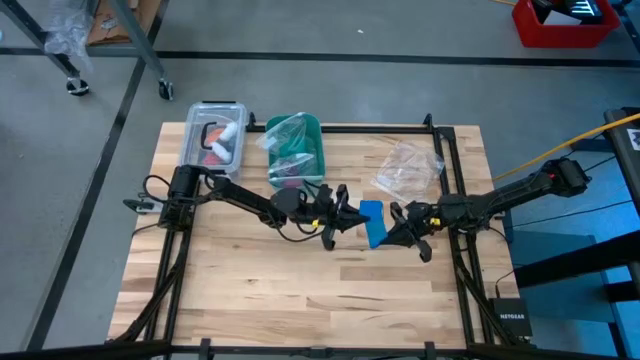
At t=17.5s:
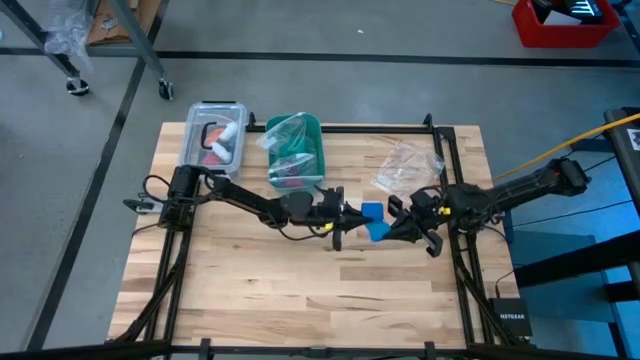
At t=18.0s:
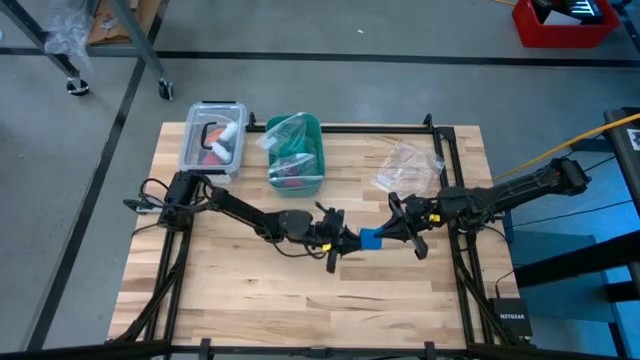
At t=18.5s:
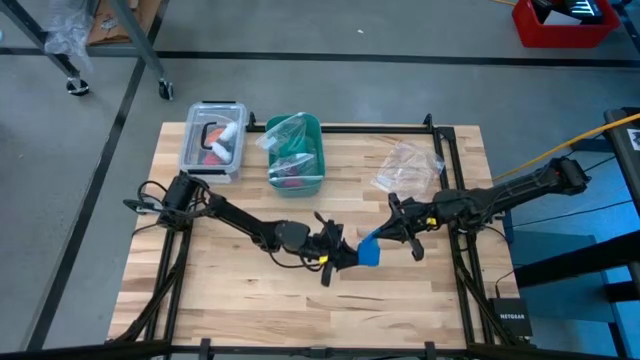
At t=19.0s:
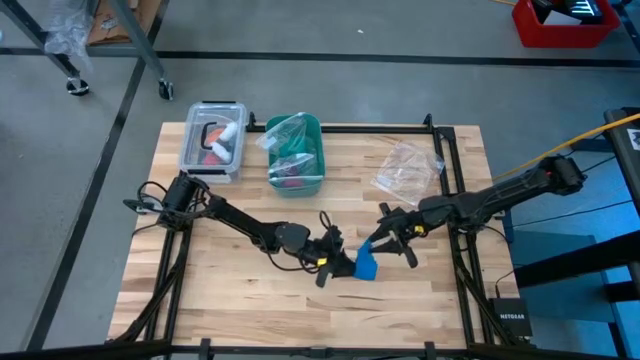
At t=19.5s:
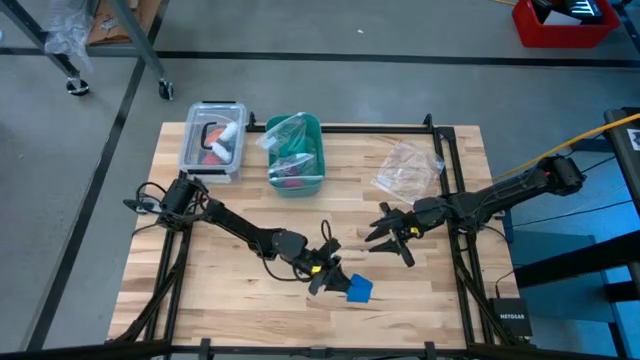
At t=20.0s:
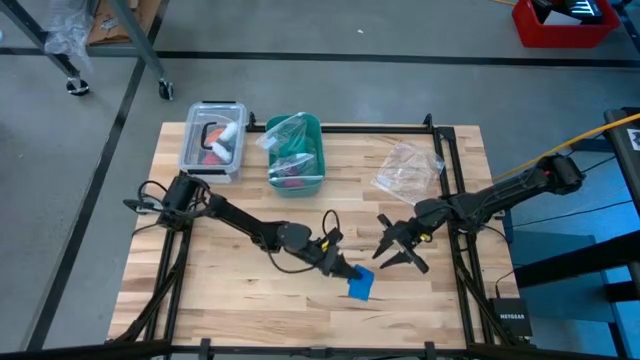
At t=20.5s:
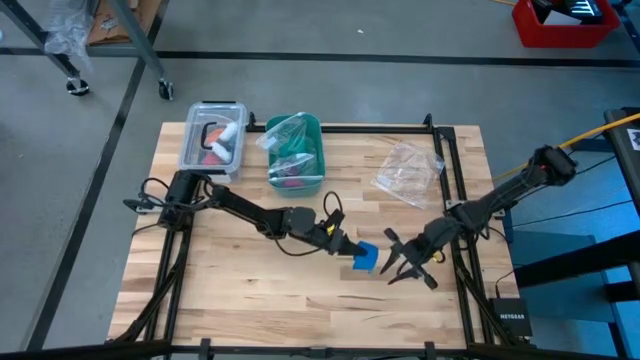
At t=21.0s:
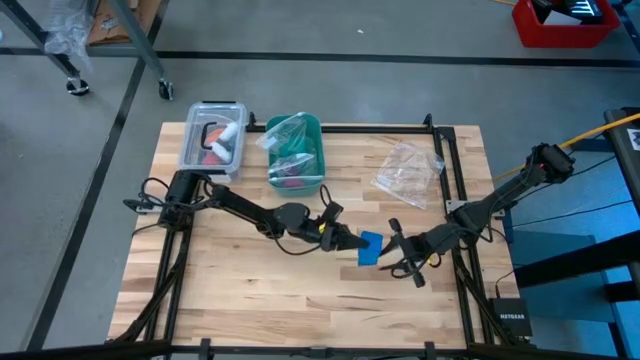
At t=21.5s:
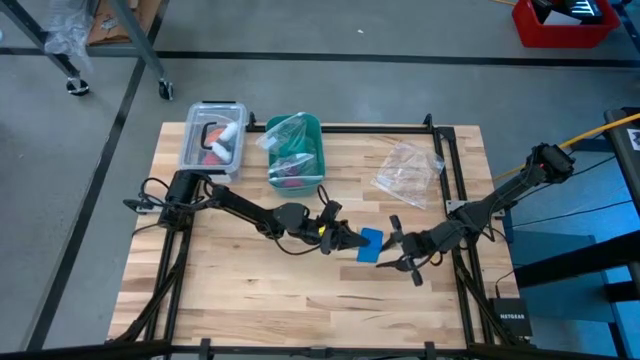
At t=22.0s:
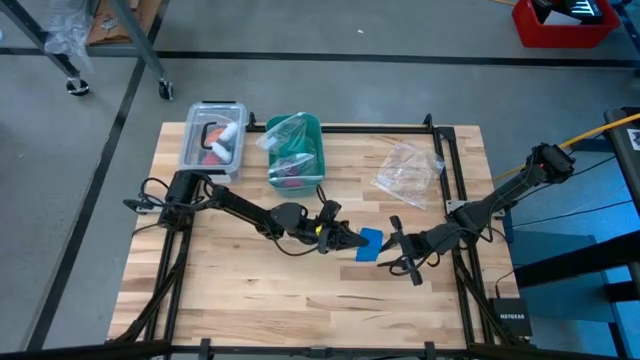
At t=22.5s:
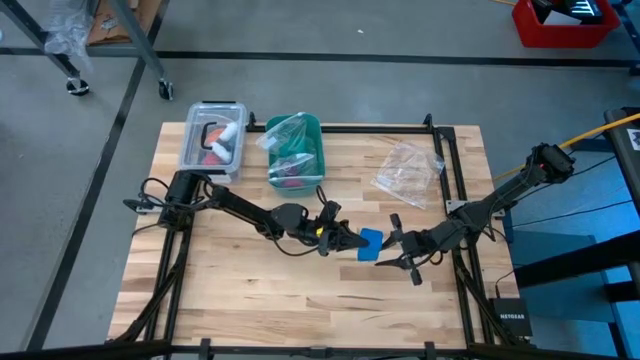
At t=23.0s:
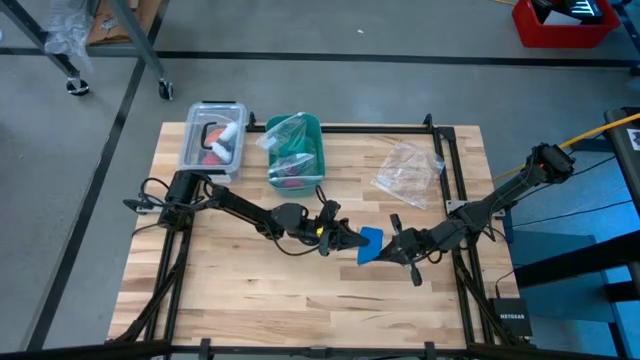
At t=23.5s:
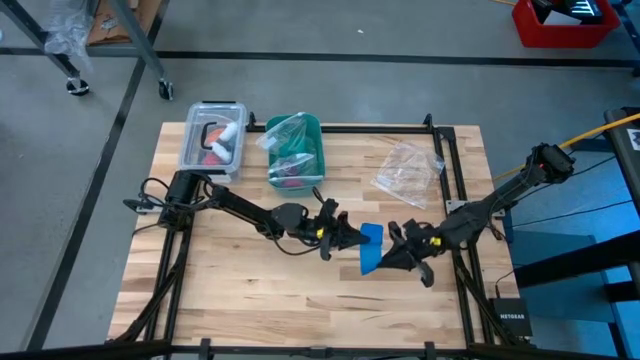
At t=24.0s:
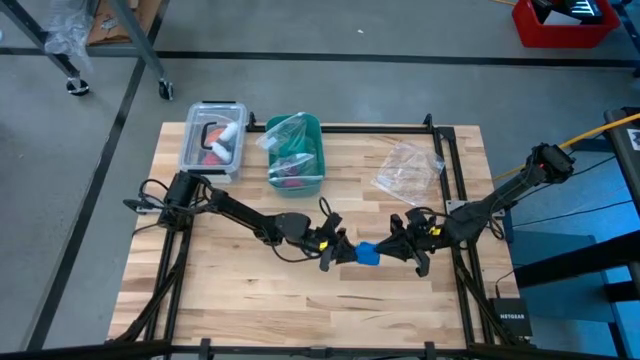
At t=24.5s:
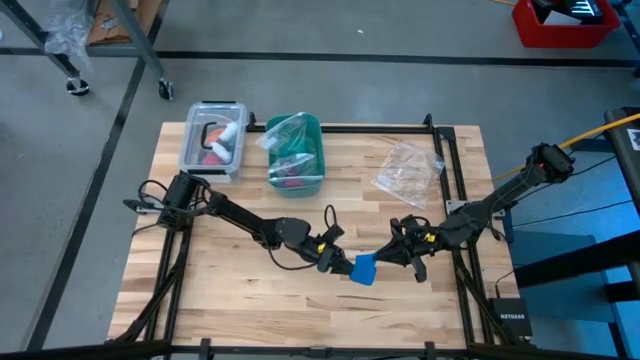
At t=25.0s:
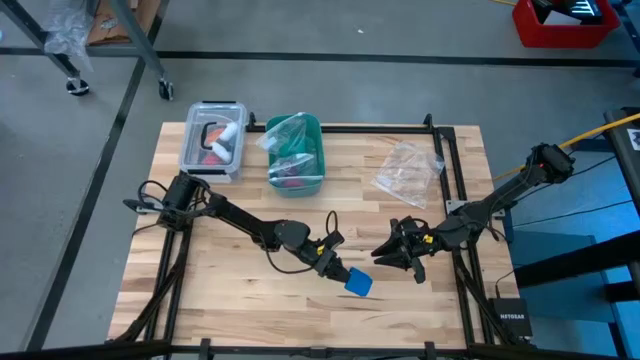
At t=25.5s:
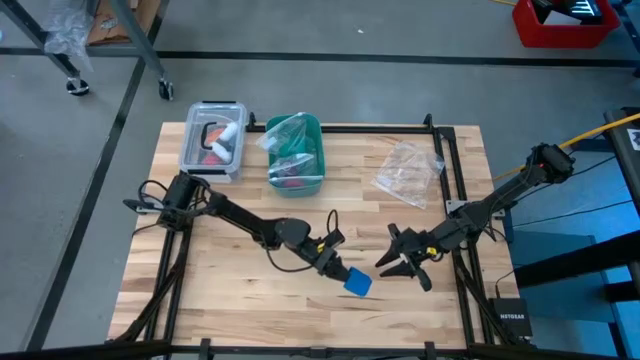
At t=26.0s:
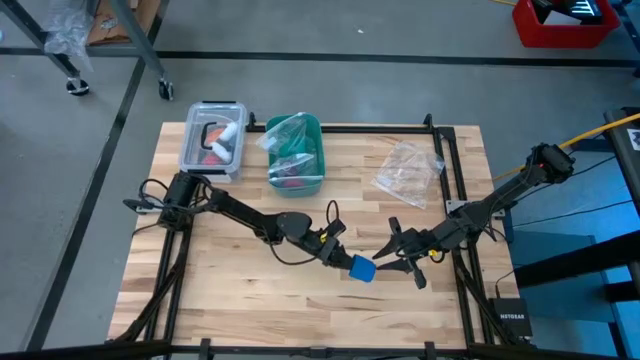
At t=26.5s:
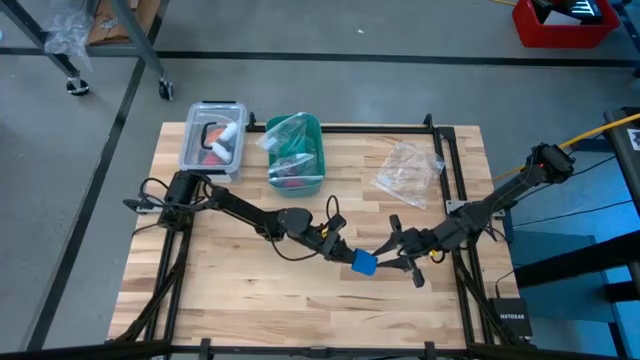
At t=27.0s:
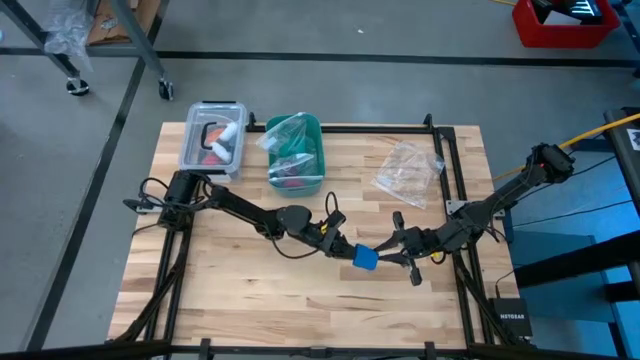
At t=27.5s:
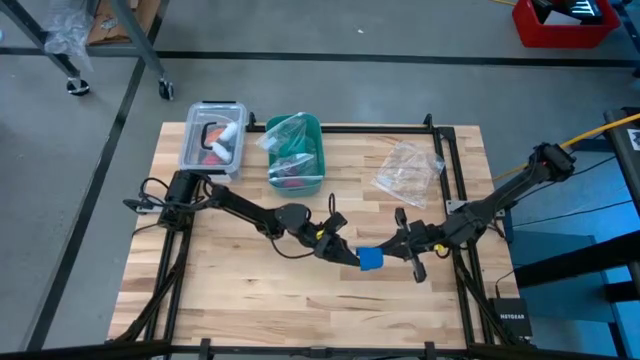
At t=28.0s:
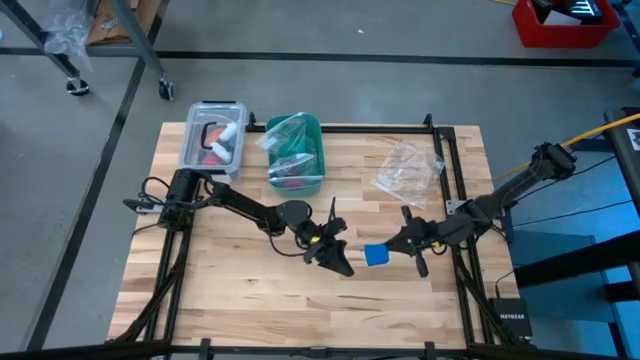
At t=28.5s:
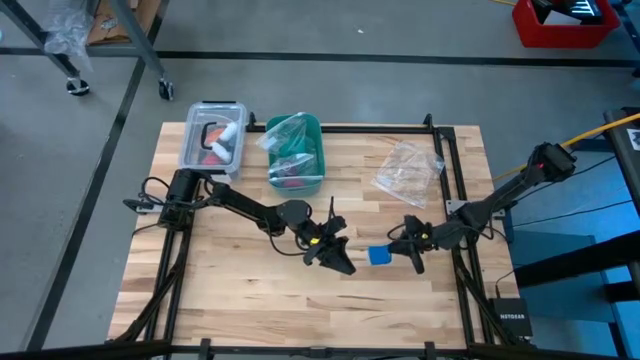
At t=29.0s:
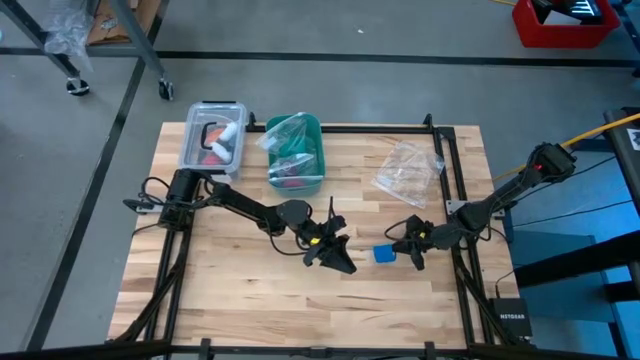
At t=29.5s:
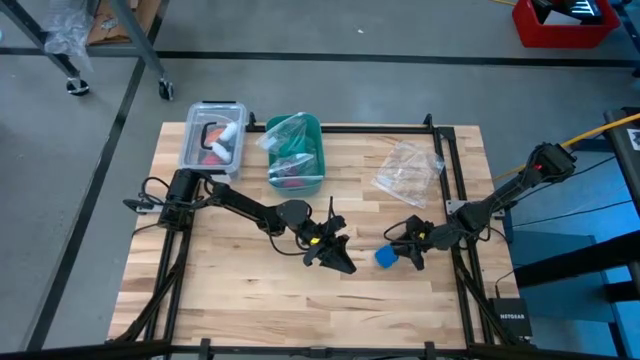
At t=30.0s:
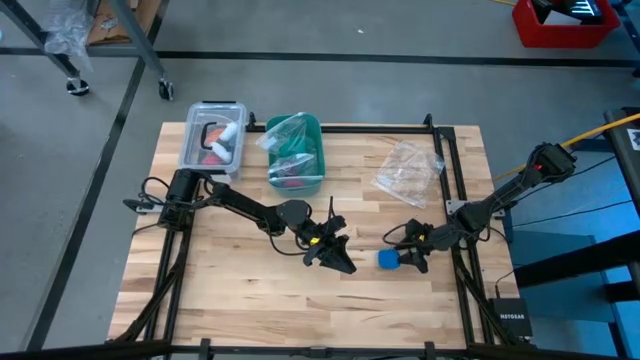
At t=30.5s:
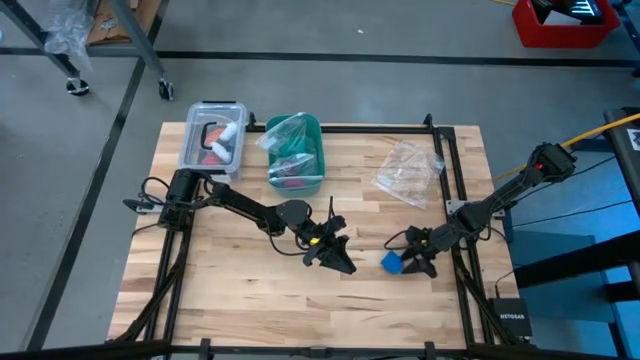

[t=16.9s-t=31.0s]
Task: Roll bandage
Roll the blue bandage

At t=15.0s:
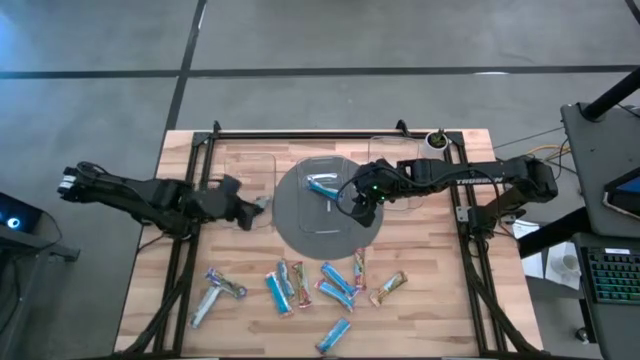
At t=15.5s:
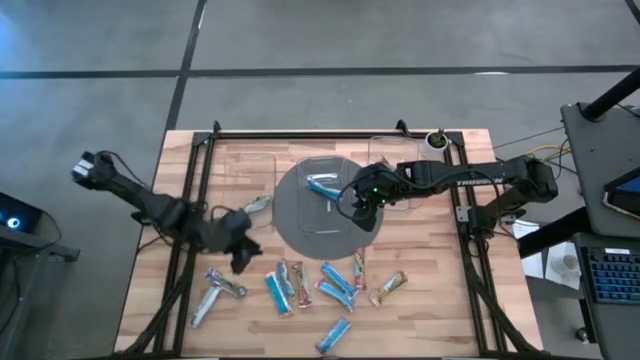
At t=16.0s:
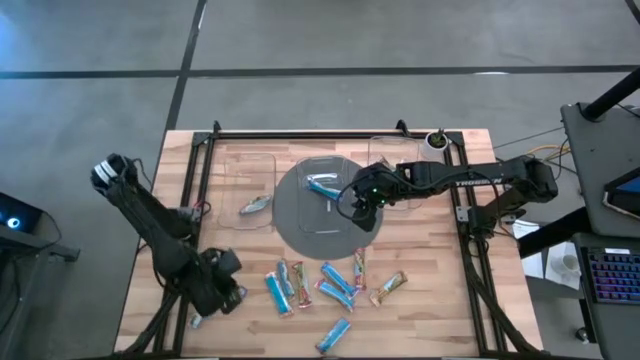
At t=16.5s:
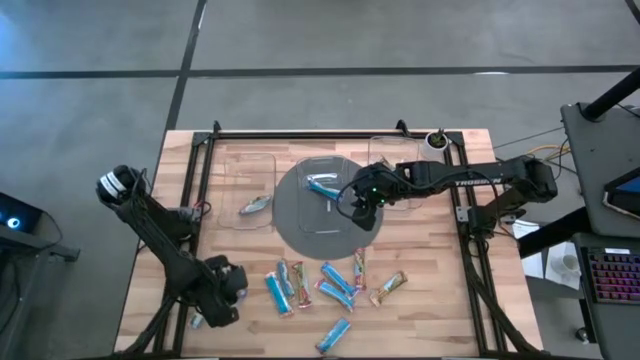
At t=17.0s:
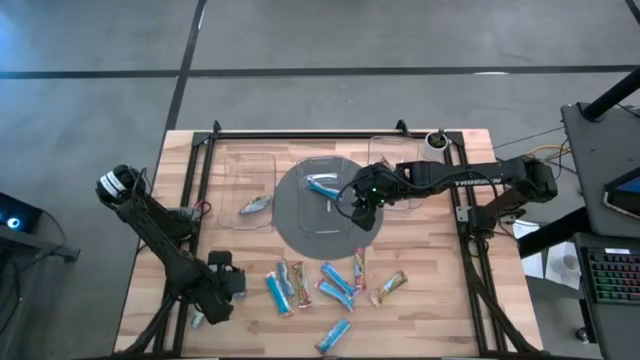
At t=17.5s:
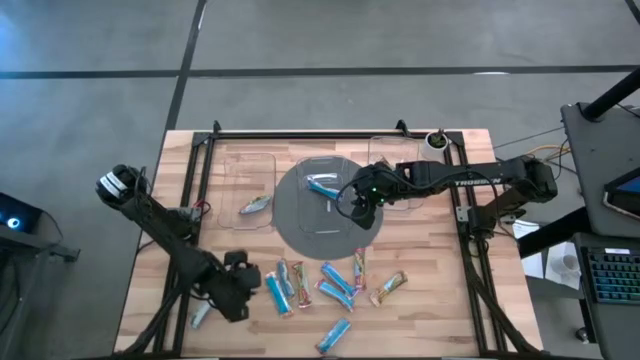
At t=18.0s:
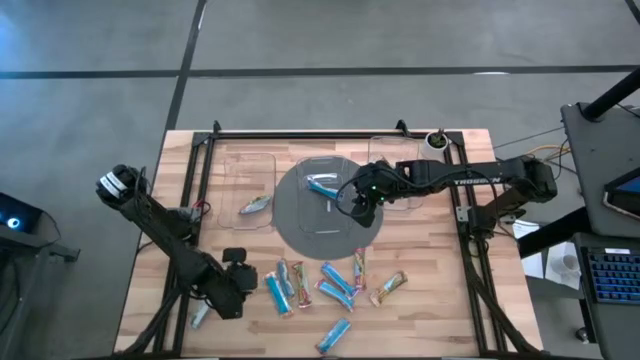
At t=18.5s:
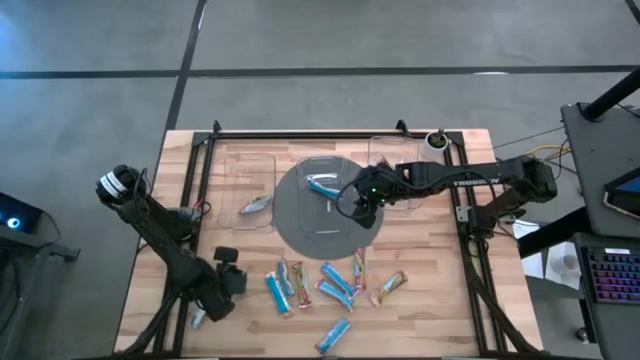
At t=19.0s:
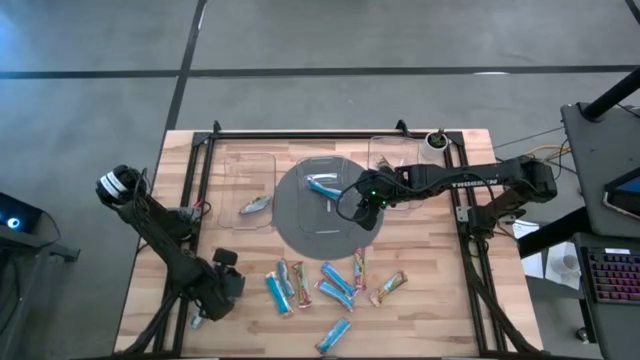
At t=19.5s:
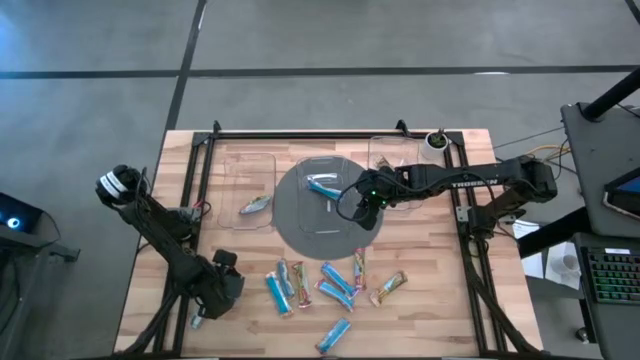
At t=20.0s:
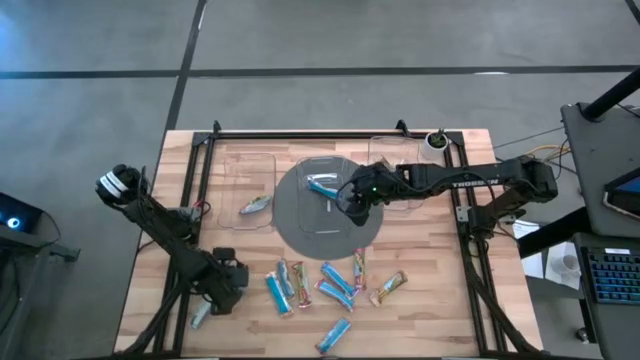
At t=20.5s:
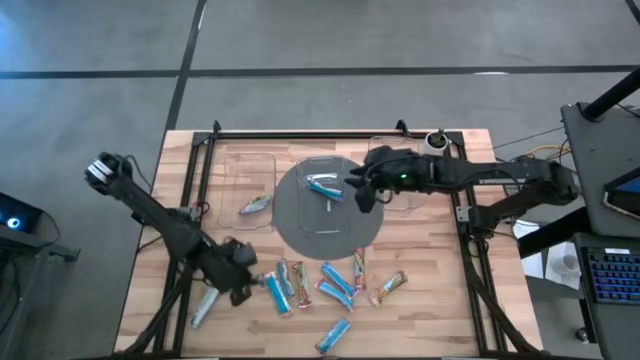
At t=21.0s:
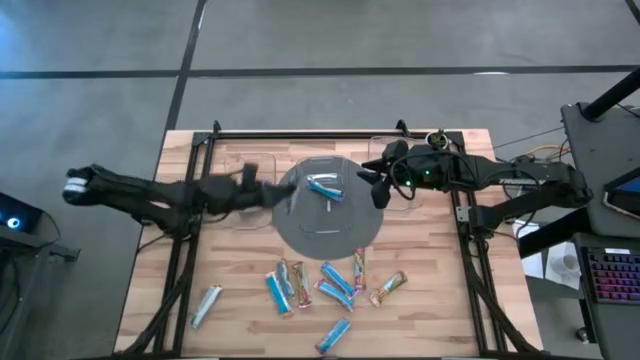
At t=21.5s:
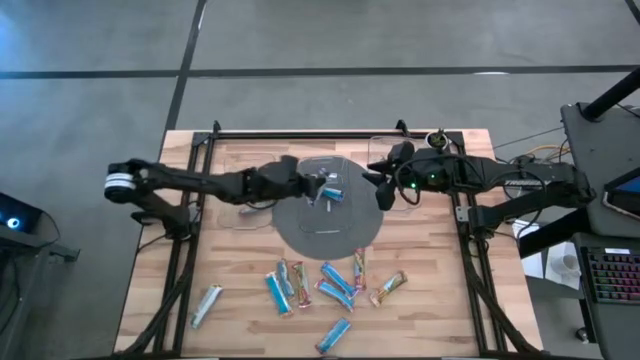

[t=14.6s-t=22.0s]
Task: Pick and place Granola Bars by type
Put the blue granola bar into the middle transparent bin
